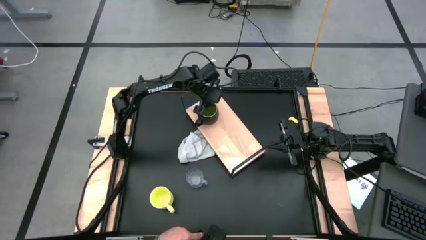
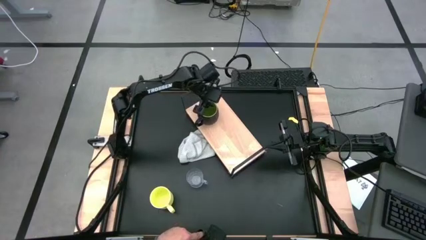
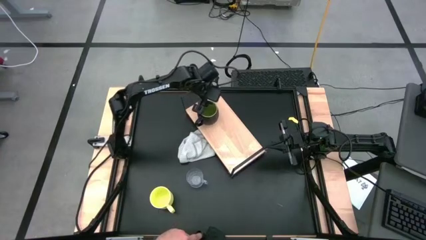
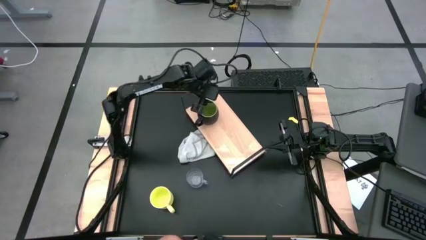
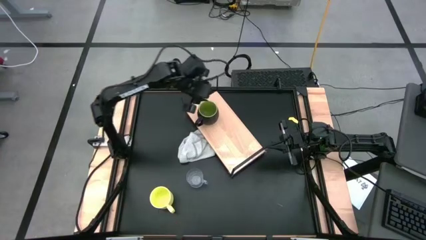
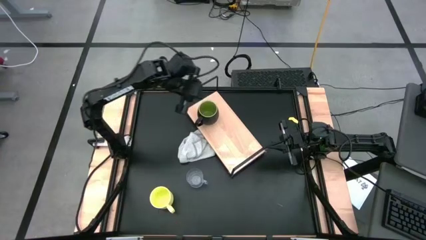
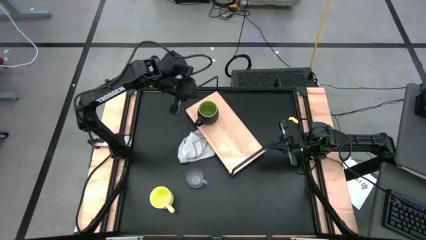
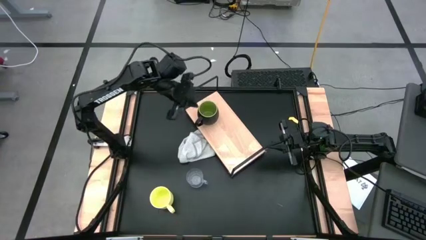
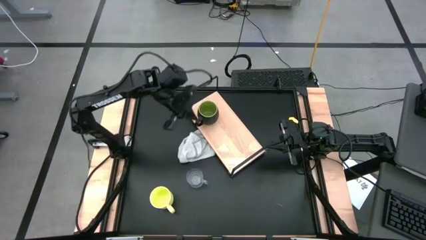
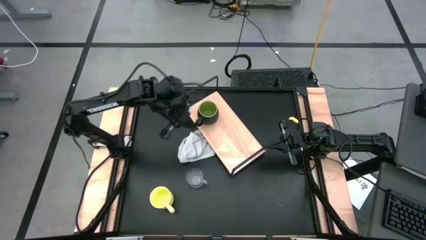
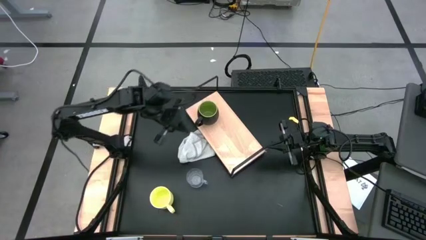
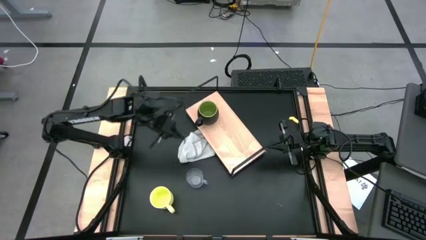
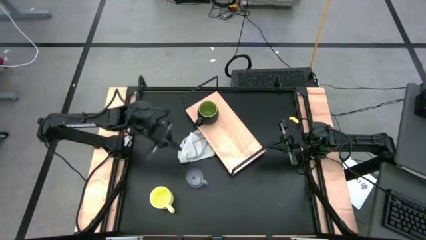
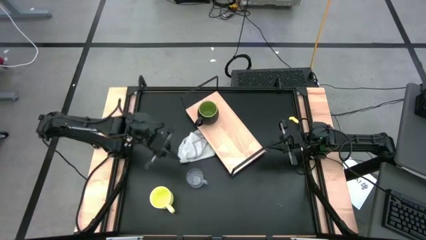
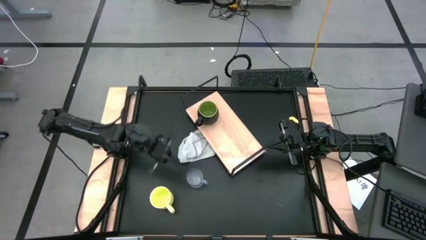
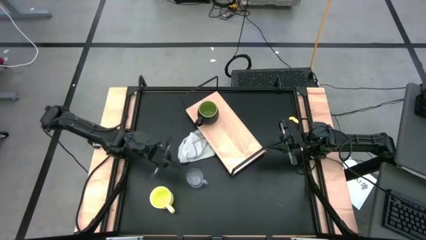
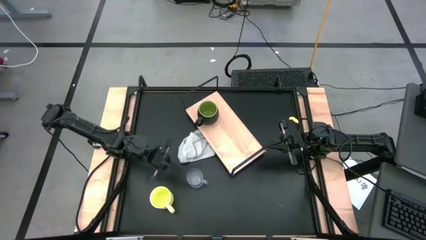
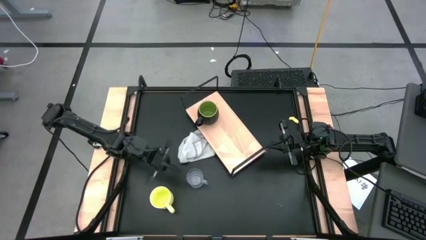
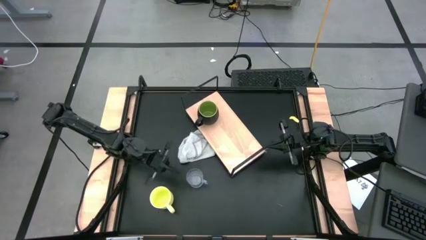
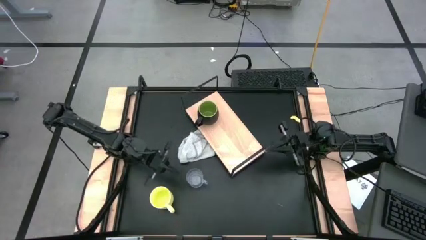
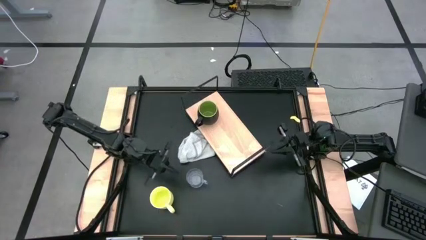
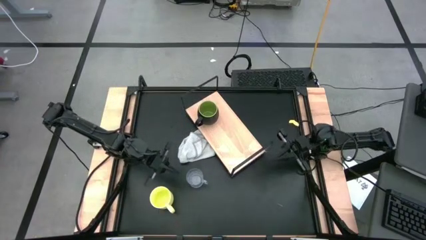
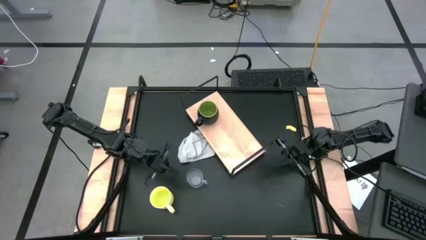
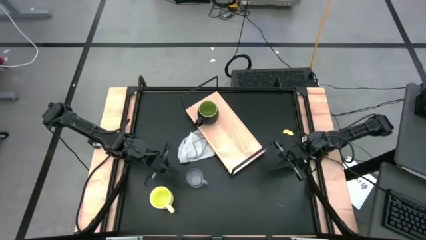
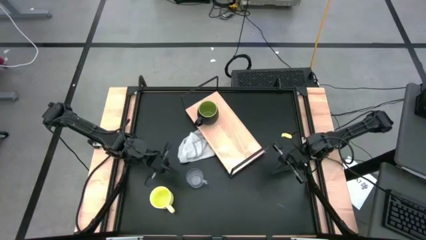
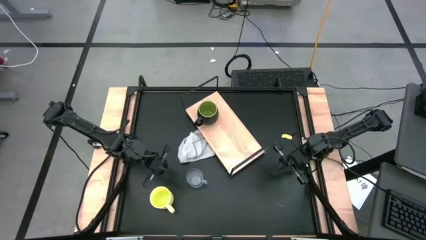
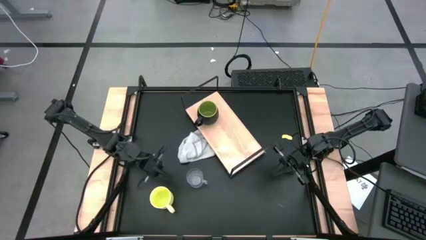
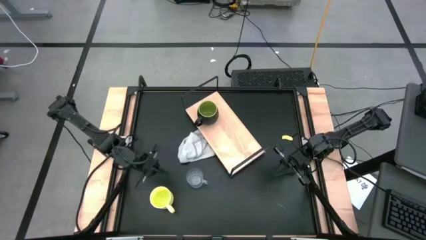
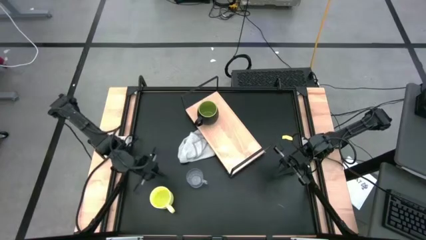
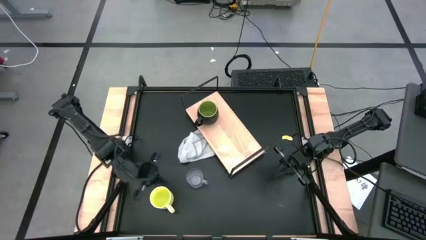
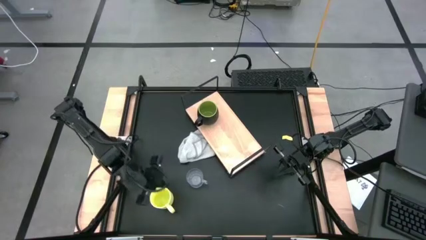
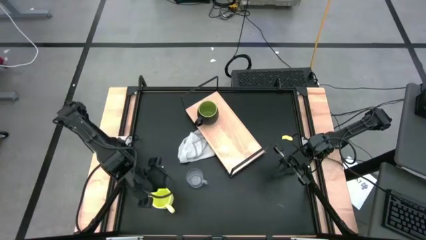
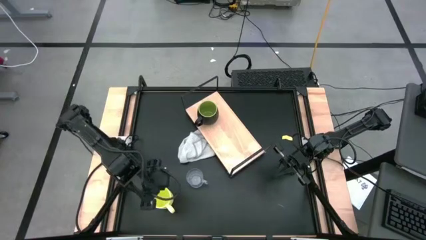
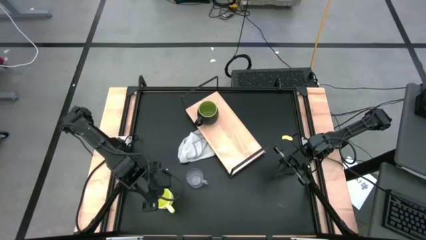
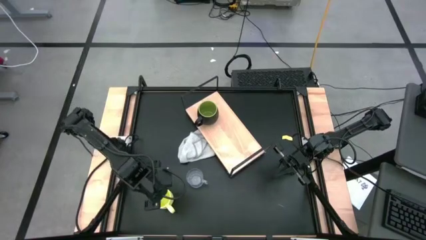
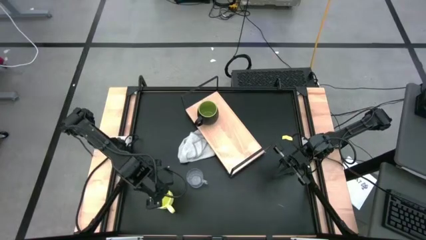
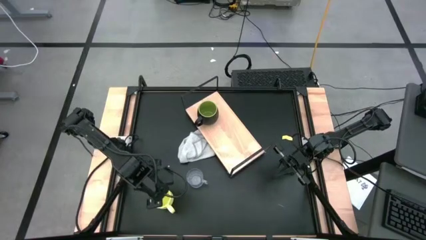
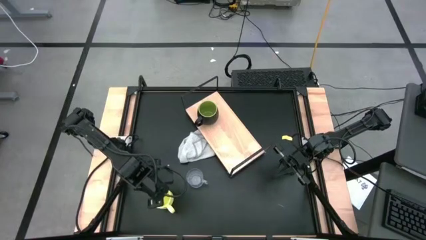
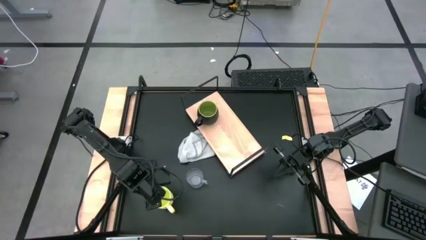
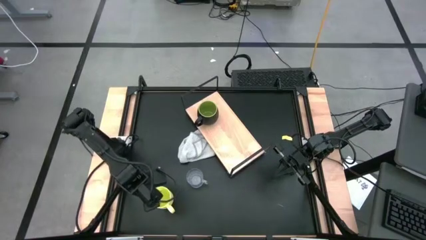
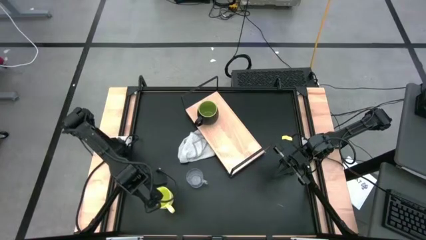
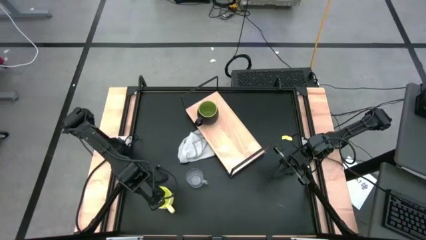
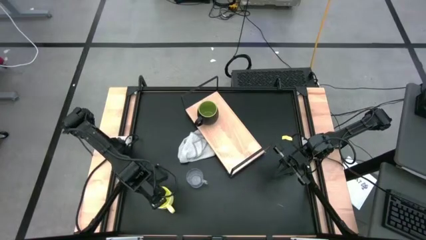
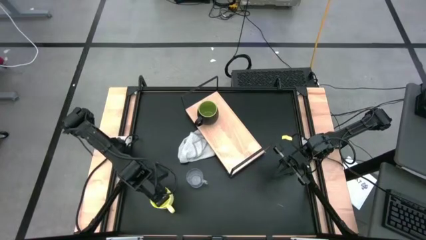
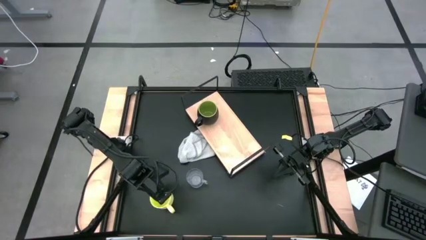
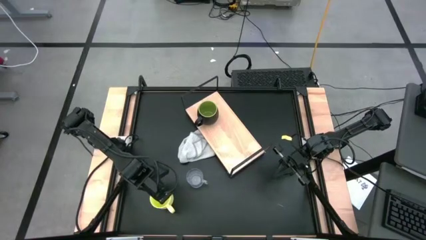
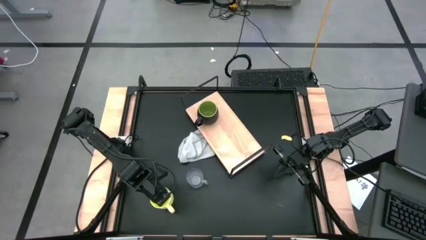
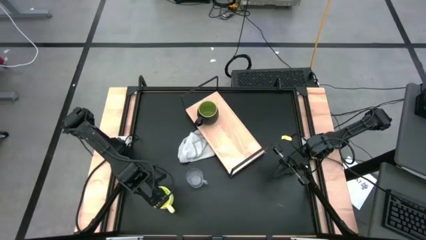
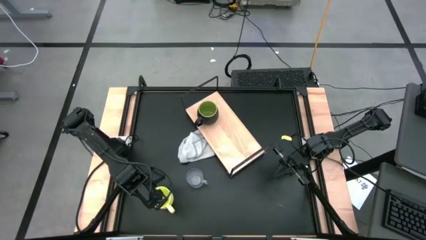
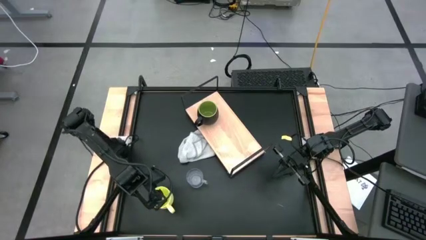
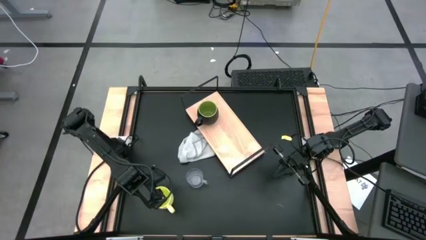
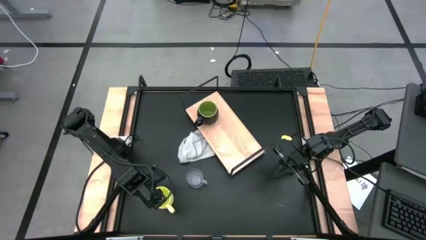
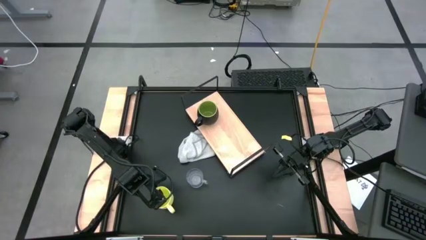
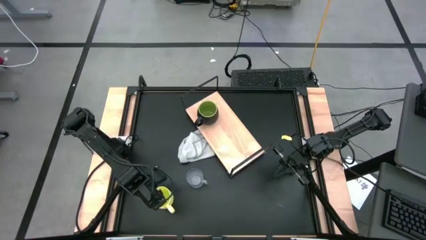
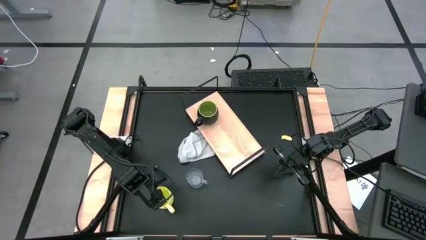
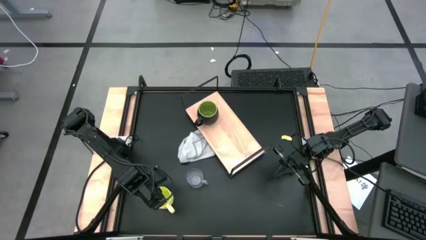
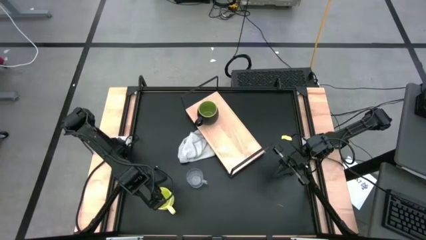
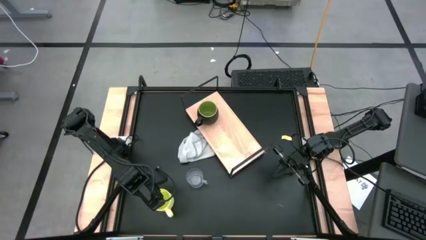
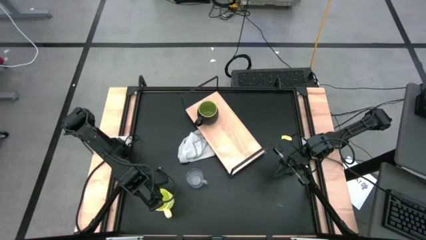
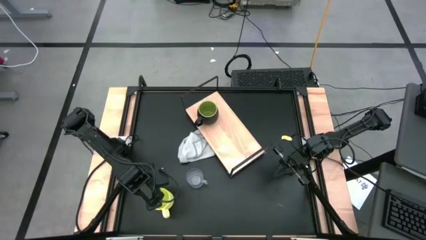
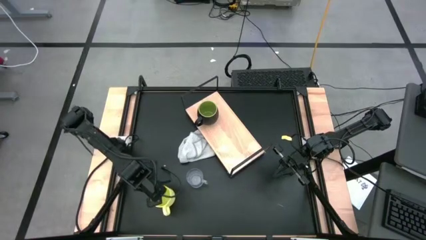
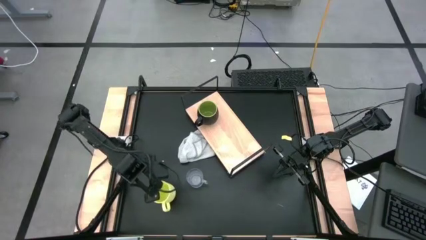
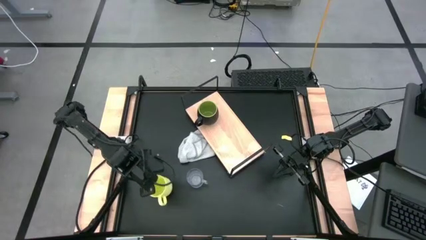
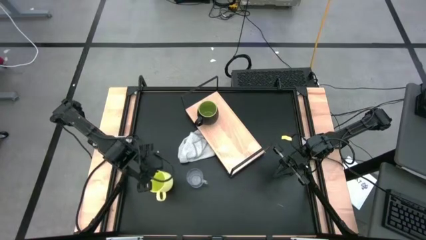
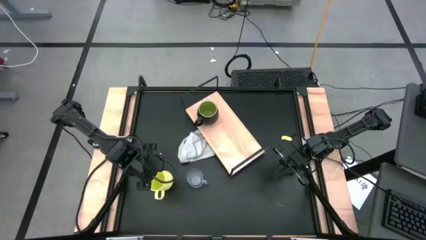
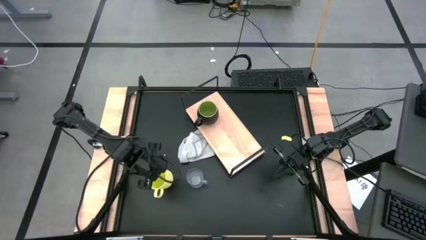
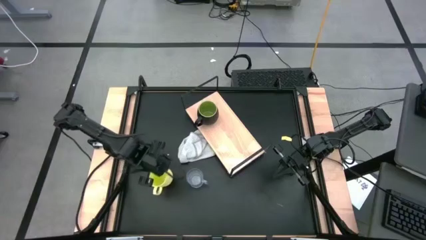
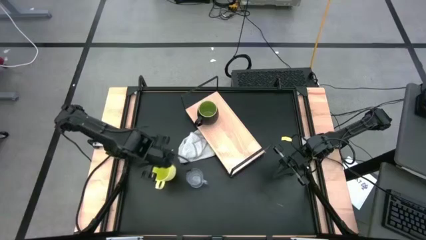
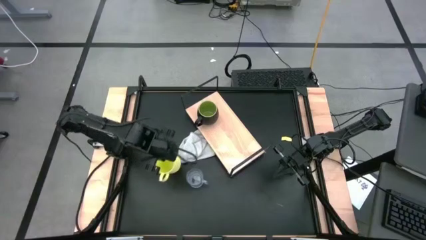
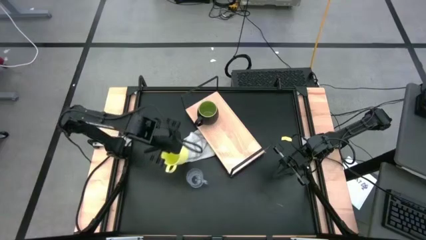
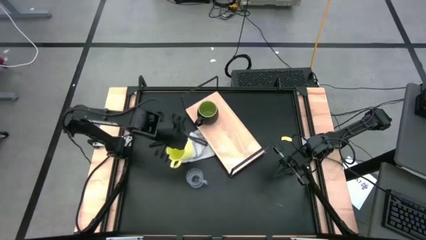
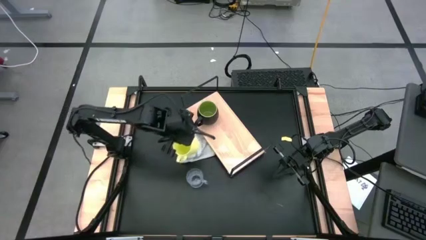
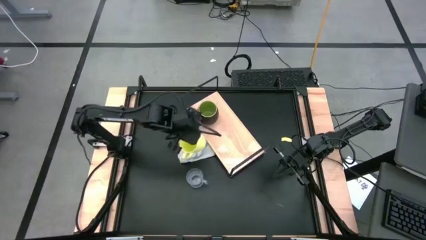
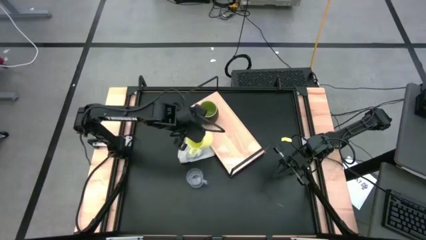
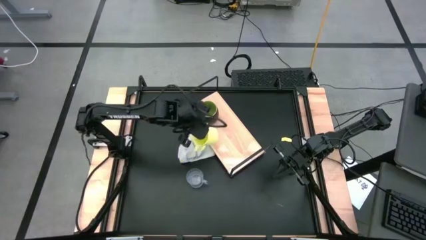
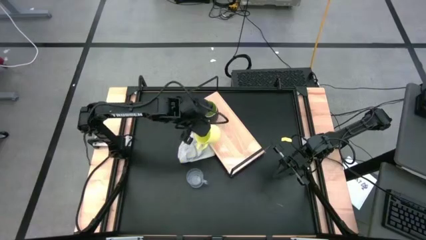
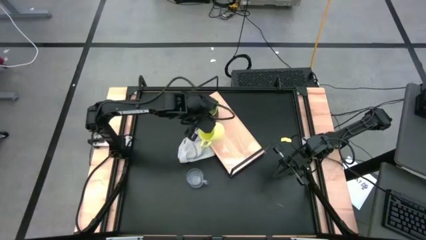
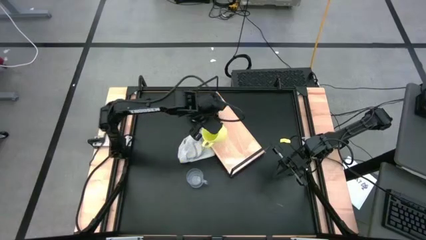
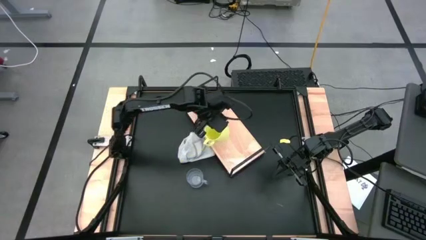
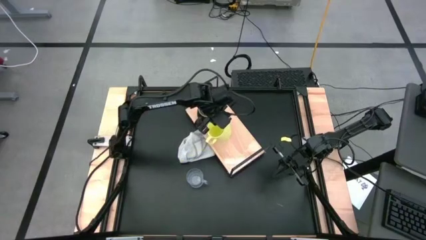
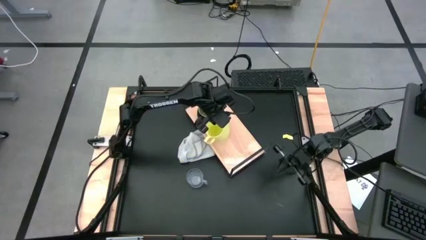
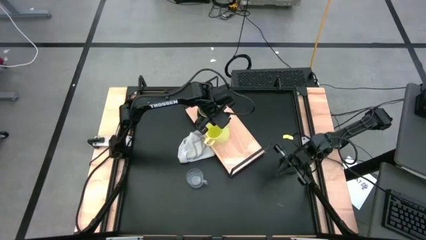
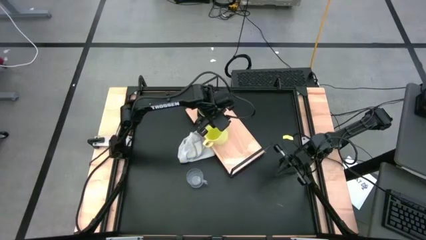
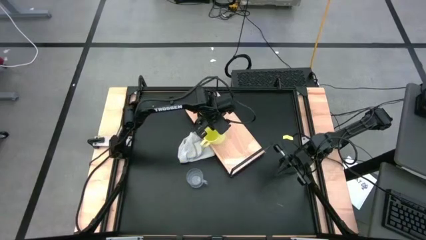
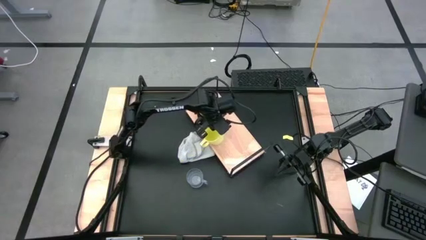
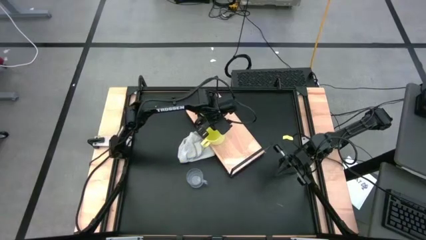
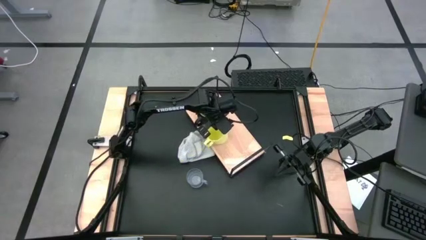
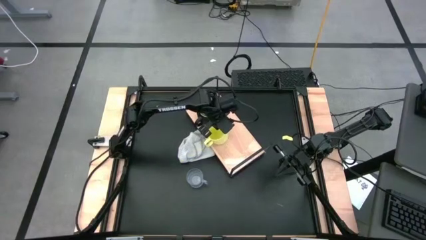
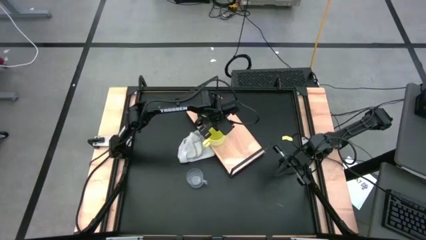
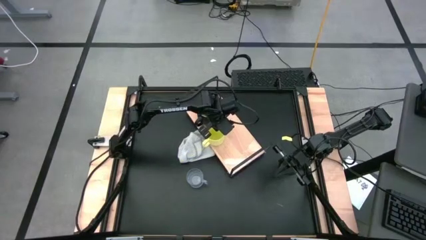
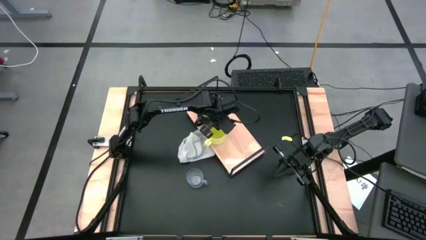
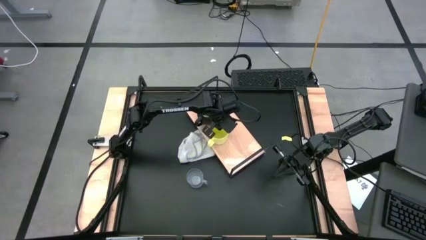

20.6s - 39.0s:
Task: Stack small to large cups/mugs on shelf
Put the yellow mug on the shelf
